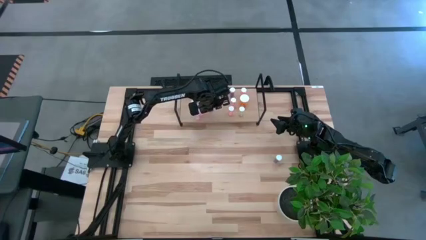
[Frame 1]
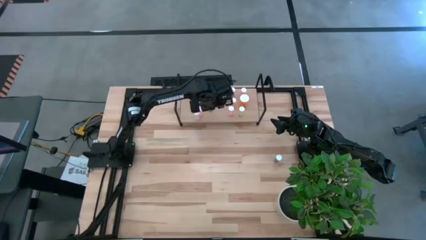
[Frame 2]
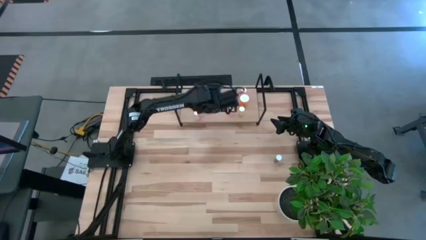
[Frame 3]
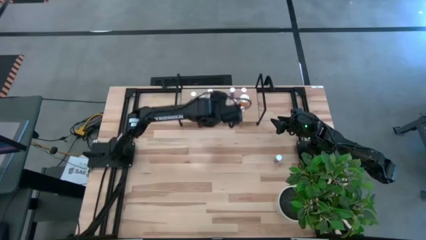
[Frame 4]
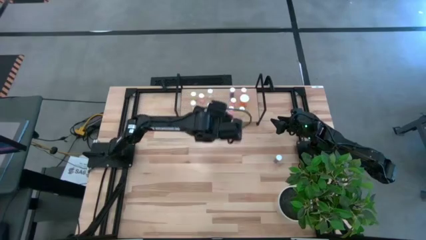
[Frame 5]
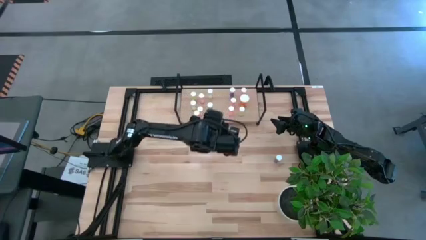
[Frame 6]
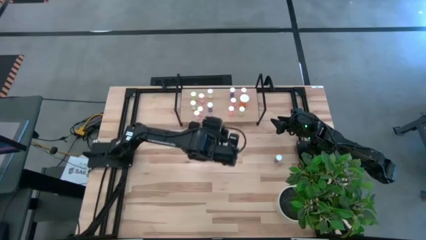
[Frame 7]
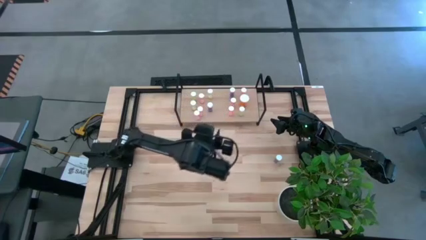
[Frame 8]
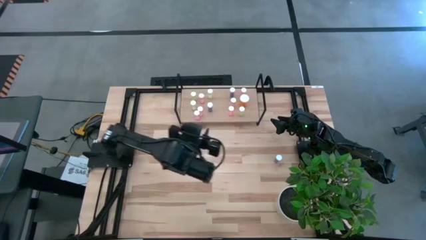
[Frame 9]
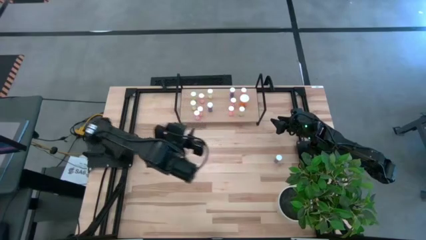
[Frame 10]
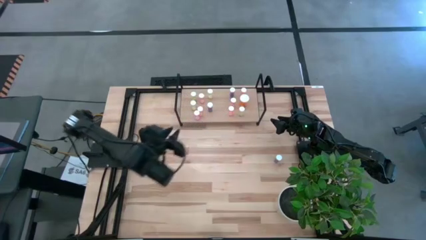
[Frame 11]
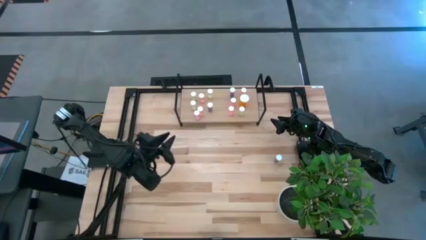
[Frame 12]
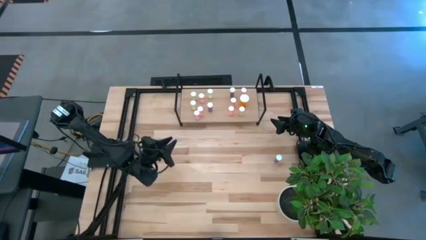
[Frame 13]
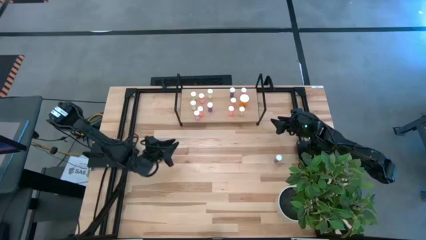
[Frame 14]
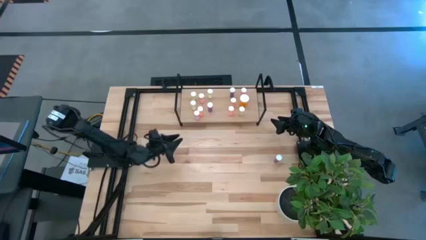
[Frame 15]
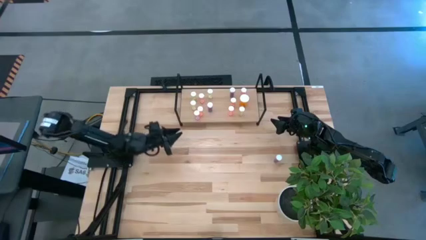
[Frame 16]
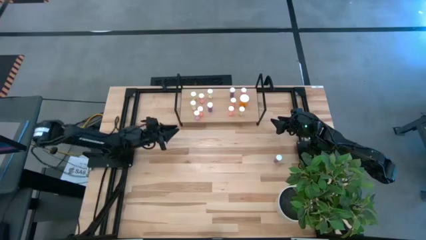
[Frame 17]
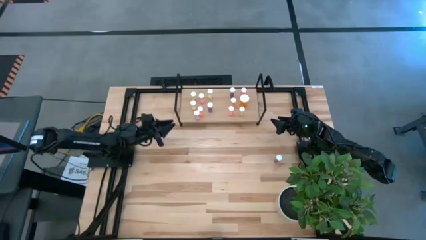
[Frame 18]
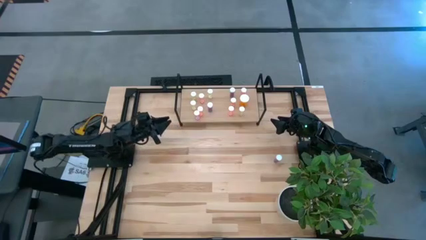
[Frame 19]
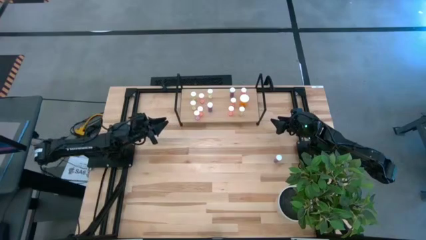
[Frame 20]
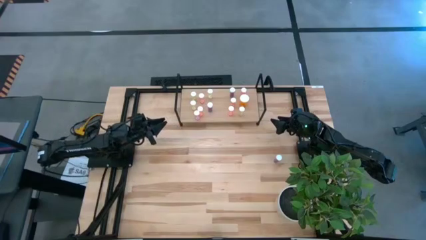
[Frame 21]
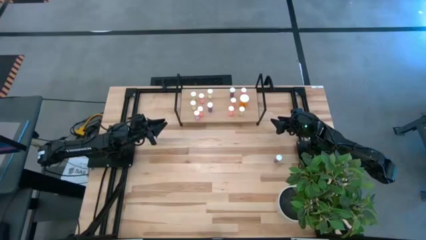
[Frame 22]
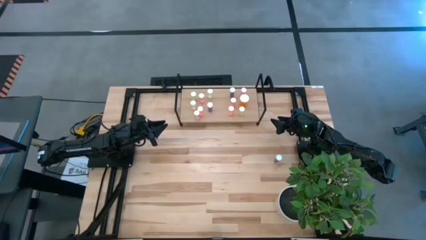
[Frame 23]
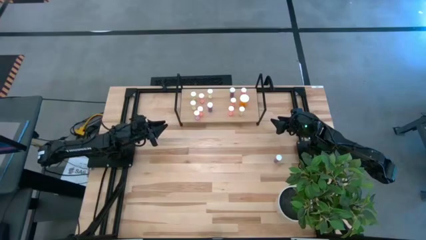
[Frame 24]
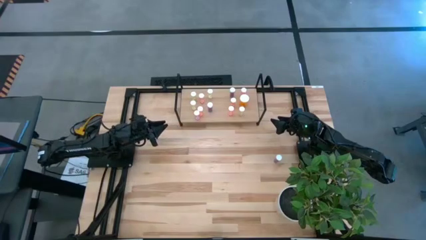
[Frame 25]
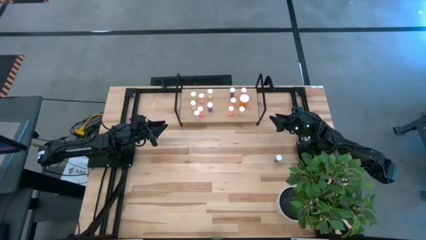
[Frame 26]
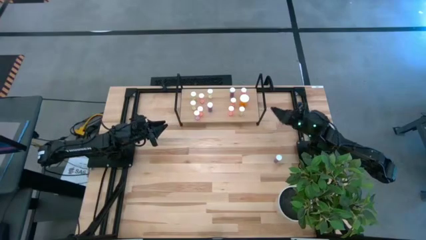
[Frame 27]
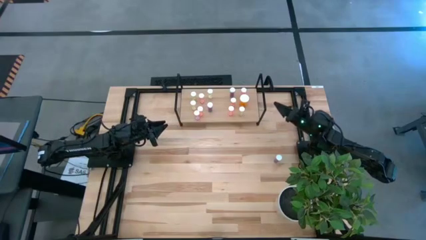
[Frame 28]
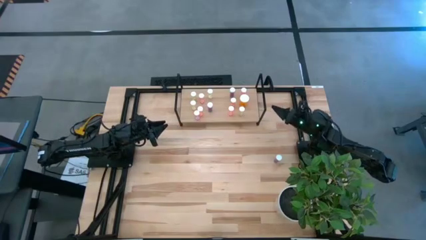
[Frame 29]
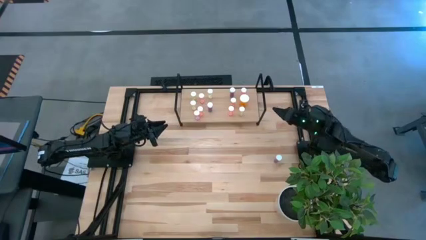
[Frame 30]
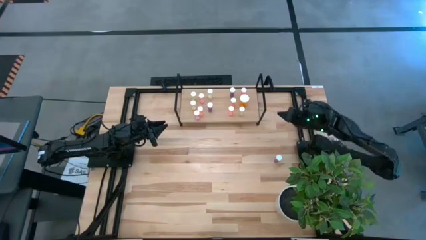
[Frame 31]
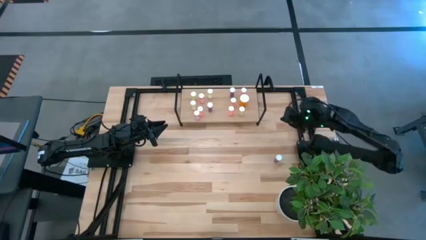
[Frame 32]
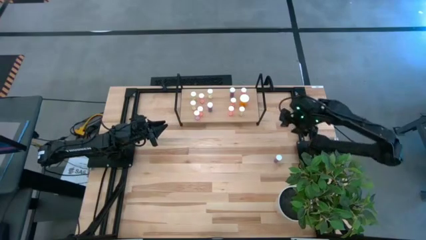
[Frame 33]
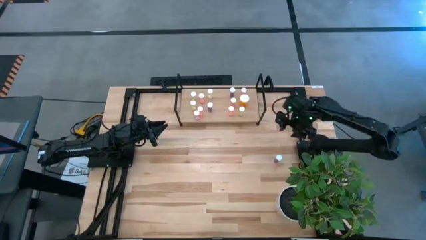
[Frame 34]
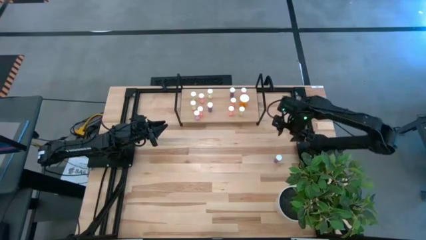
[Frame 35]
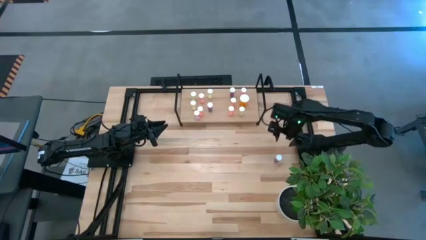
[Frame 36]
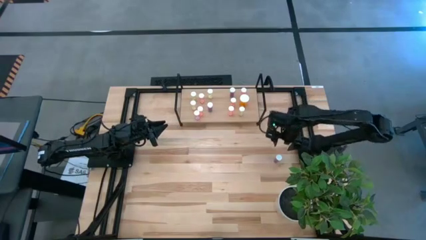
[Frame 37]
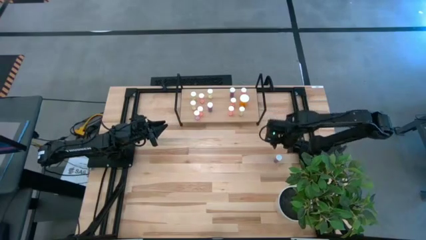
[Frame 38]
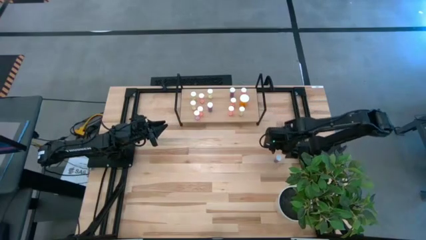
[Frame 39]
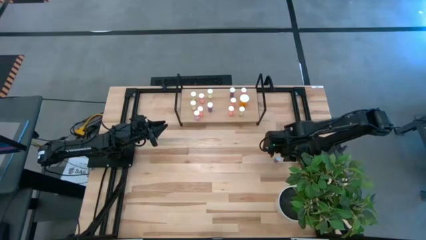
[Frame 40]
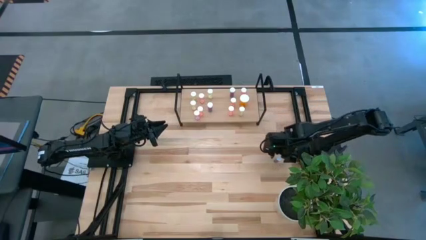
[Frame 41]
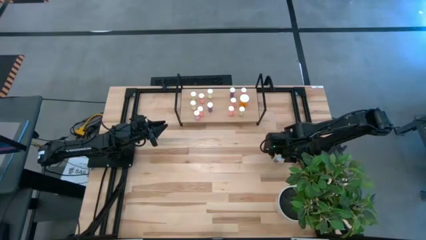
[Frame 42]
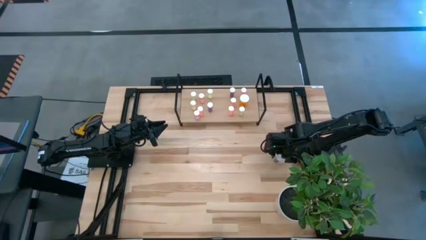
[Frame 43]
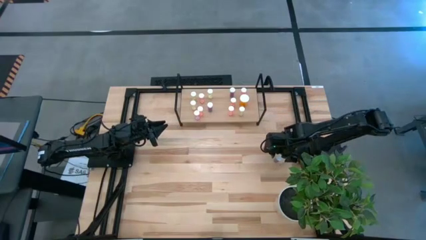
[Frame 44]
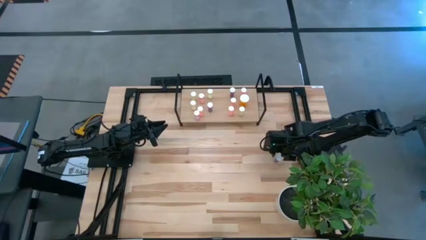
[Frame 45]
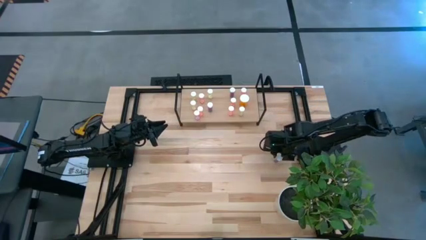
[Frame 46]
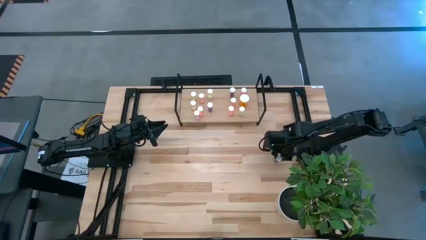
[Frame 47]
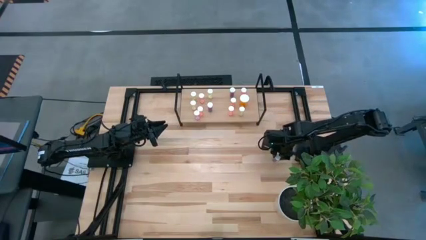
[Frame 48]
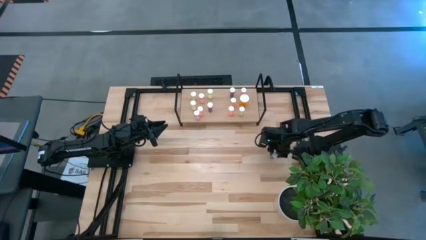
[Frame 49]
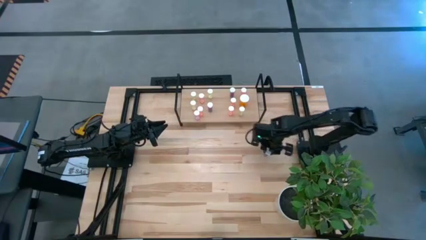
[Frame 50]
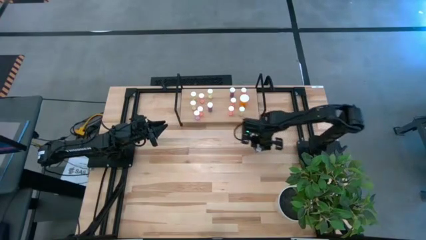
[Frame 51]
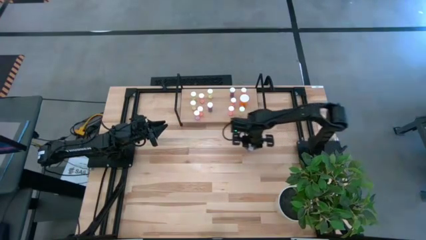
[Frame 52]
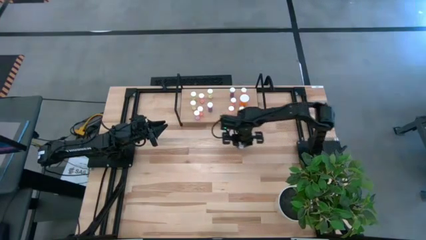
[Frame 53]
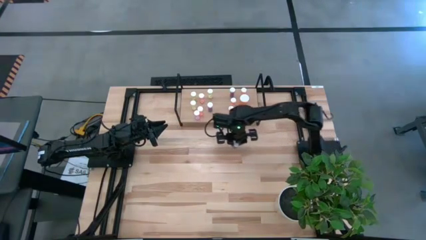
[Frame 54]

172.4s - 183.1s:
Task: Pick and place medicine bottles onto shelf by color
Put the blue pill bottle on the shelf

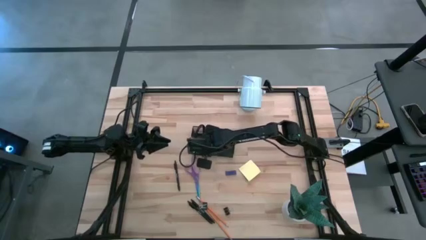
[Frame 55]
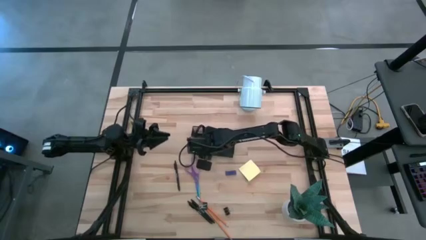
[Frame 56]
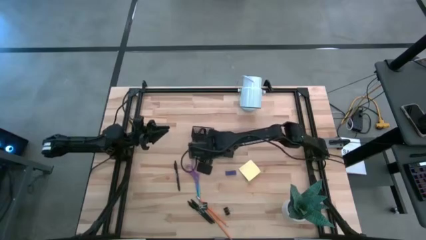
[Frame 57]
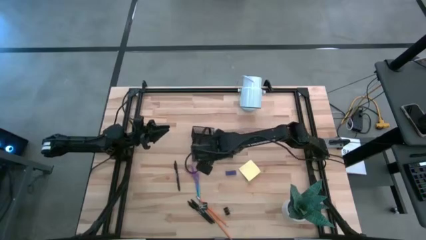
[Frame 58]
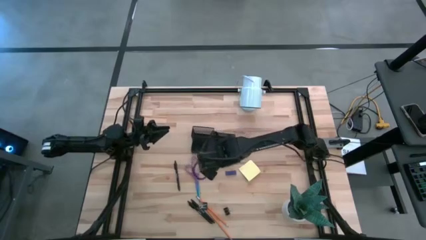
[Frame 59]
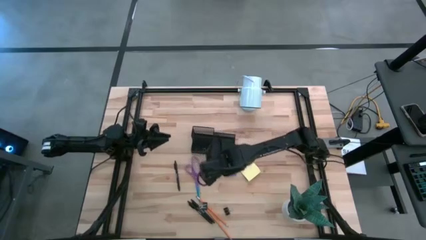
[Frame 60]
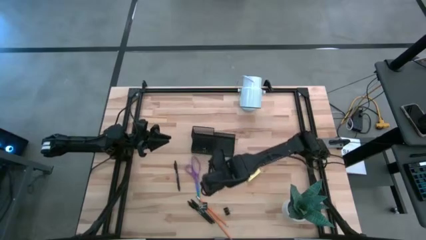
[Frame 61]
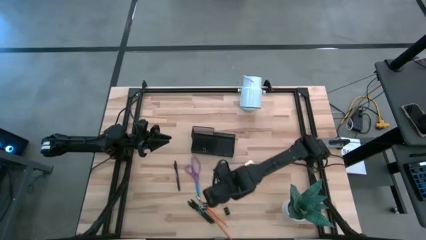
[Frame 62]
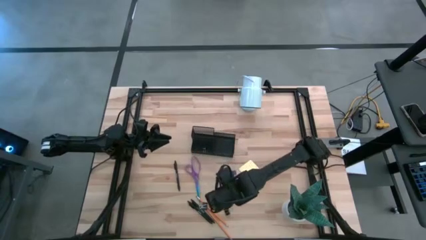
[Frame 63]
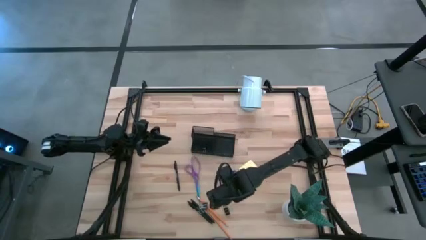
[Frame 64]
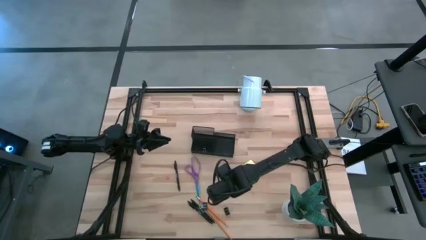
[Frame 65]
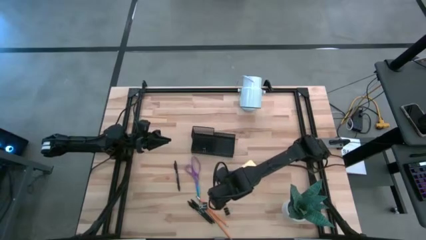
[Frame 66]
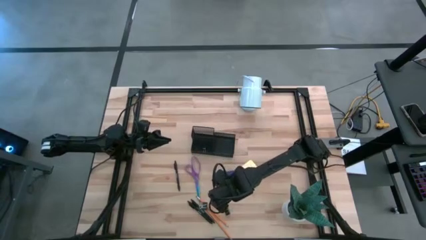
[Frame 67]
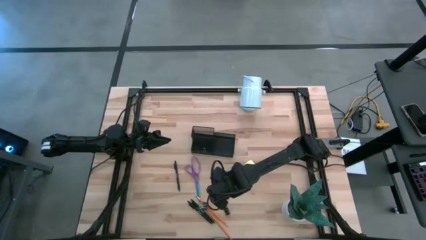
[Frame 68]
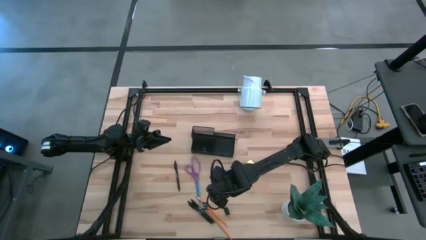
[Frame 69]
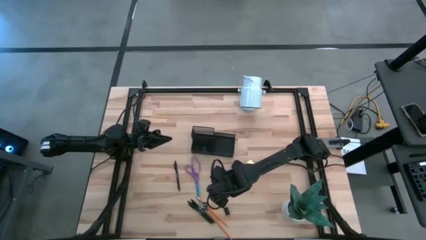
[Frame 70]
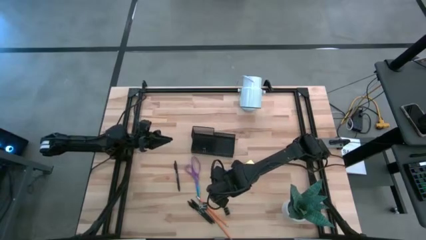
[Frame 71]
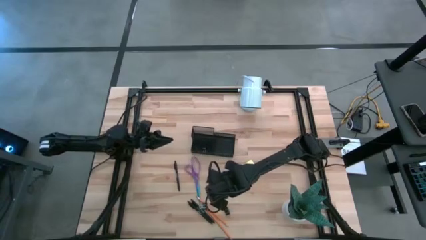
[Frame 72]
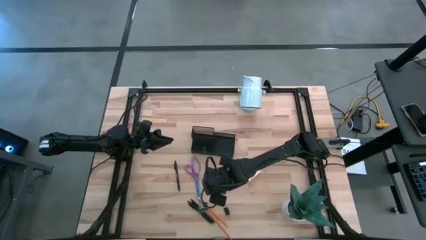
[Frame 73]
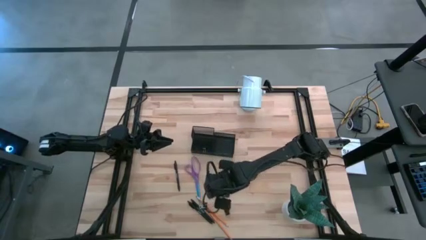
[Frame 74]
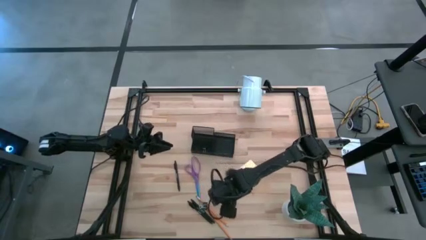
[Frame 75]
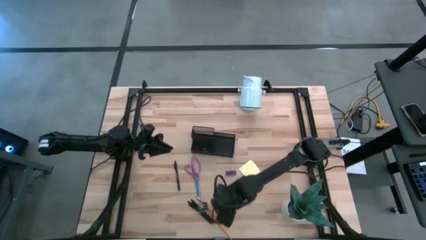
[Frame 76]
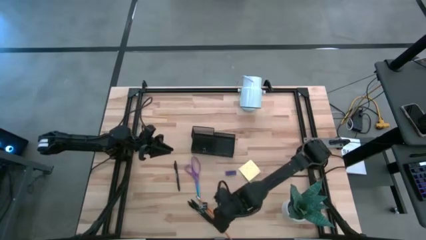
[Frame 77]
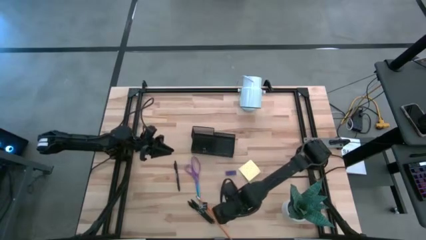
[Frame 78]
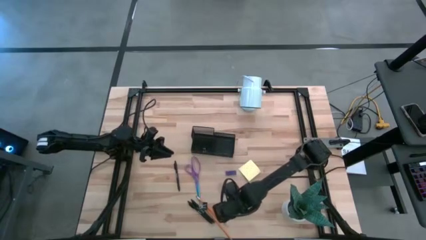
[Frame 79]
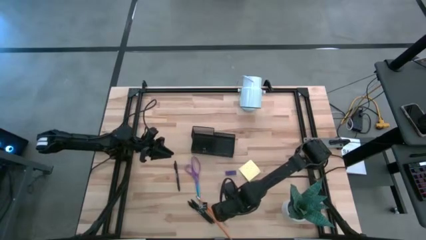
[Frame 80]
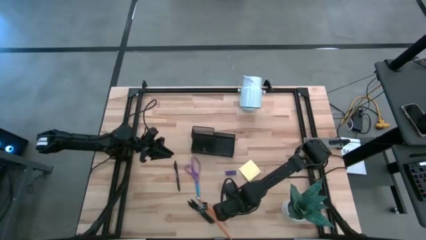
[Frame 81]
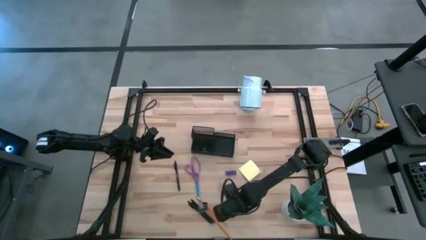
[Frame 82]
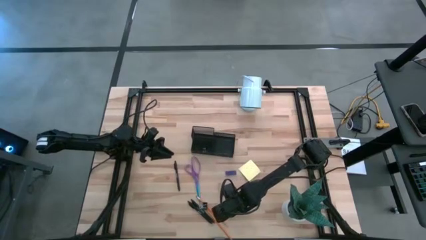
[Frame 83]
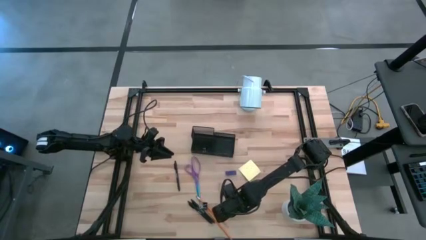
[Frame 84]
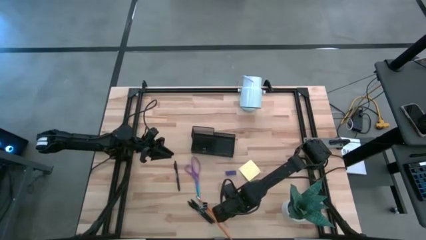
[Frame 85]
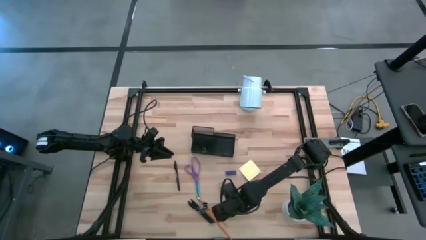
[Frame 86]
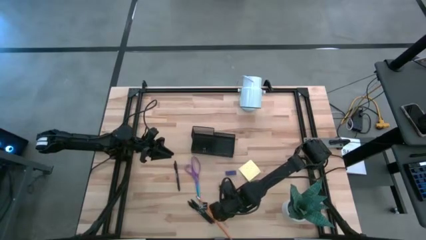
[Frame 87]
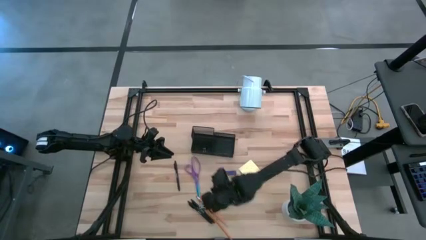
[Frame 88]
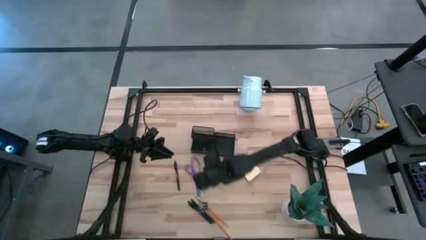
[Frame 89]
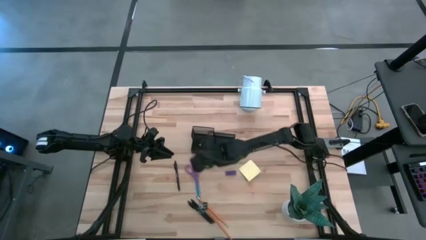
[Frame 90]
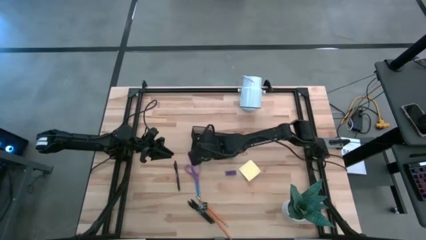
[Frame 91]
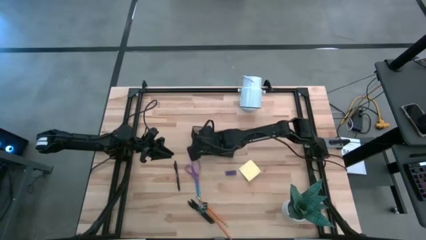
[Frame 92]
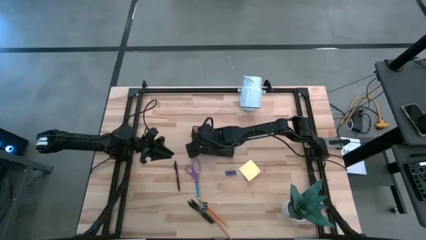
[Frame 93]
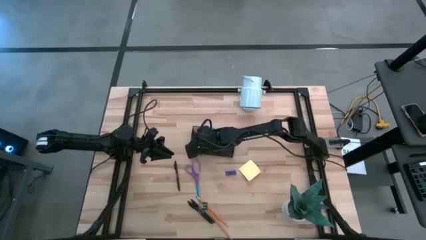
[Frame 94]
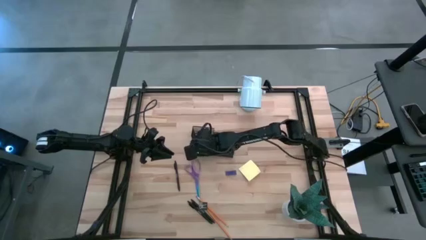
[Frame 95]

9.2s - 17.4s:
Task: Pick and place office supplies into organizer
Put the right black binder clip into the black desk organizer
